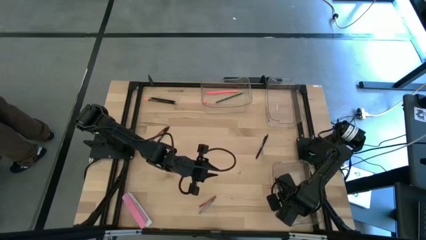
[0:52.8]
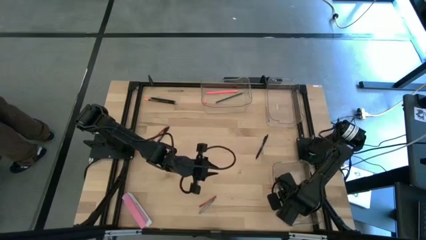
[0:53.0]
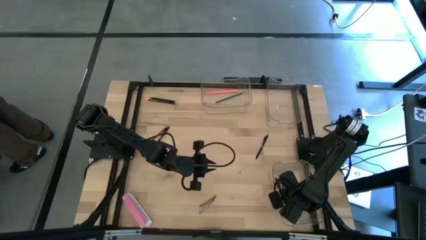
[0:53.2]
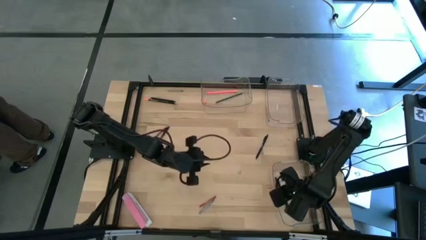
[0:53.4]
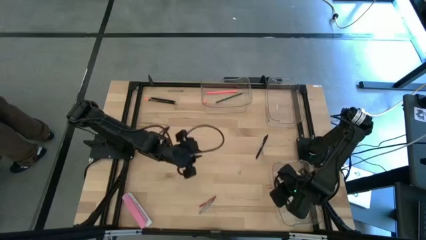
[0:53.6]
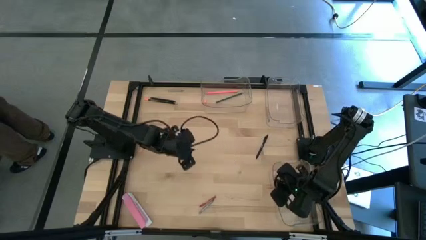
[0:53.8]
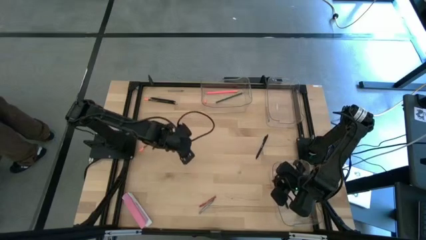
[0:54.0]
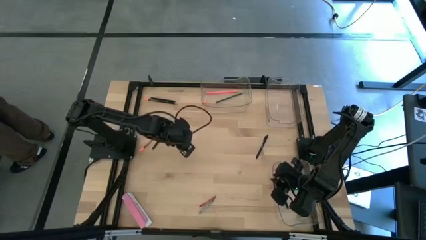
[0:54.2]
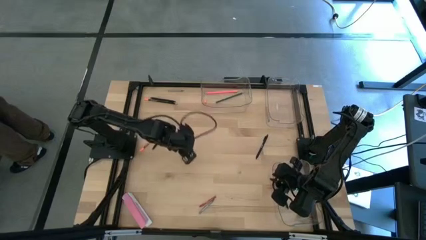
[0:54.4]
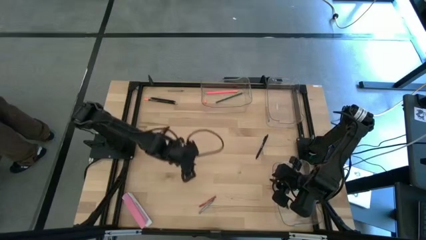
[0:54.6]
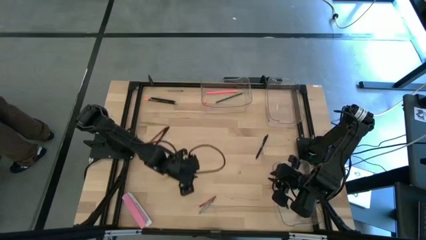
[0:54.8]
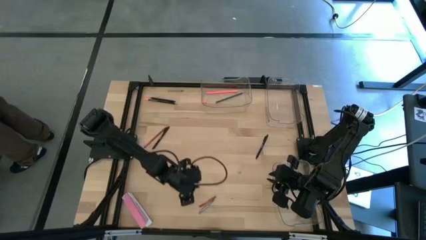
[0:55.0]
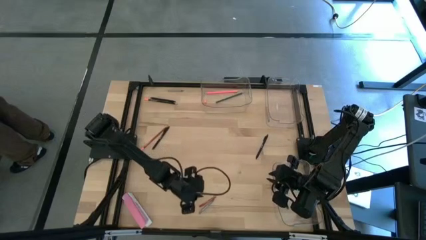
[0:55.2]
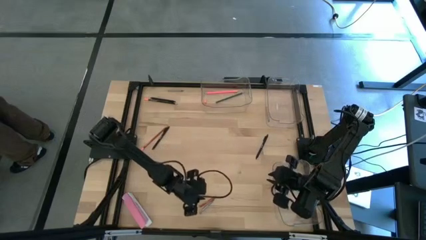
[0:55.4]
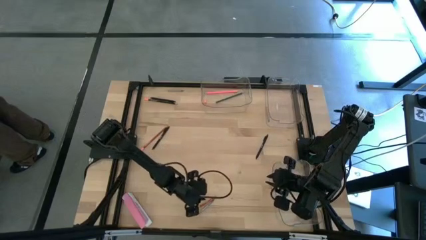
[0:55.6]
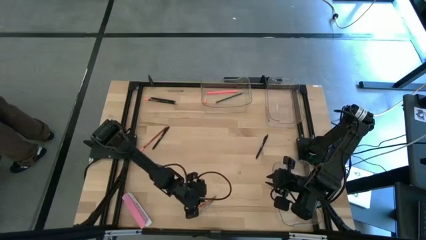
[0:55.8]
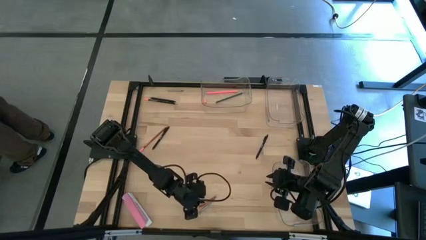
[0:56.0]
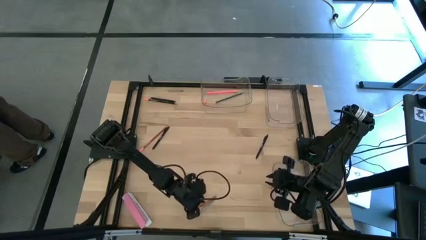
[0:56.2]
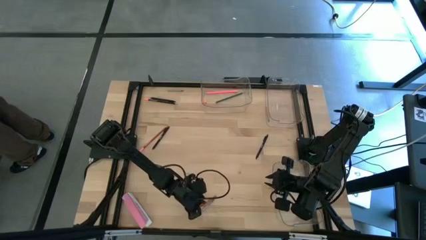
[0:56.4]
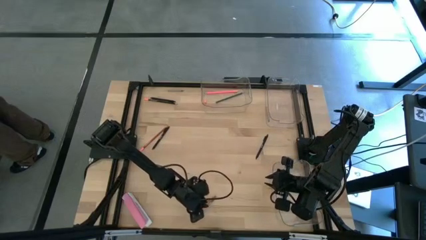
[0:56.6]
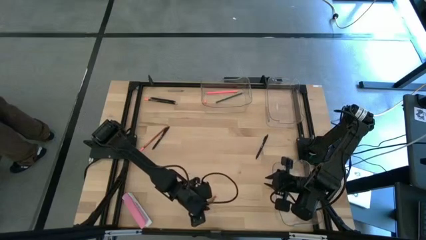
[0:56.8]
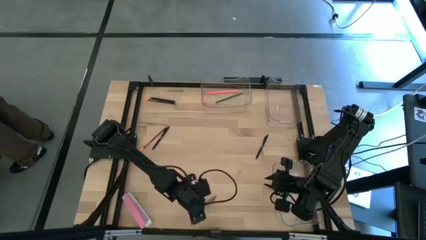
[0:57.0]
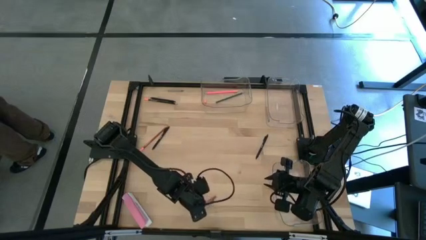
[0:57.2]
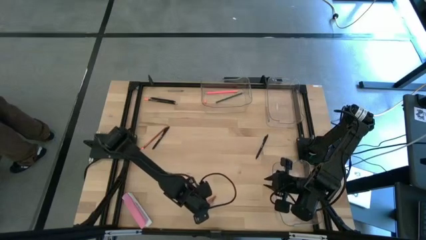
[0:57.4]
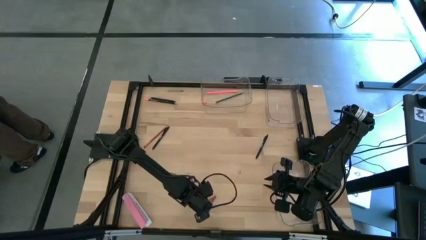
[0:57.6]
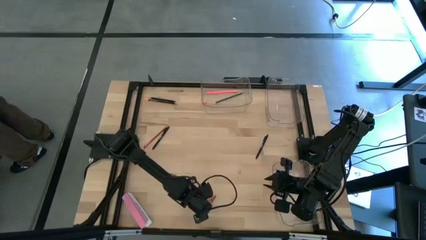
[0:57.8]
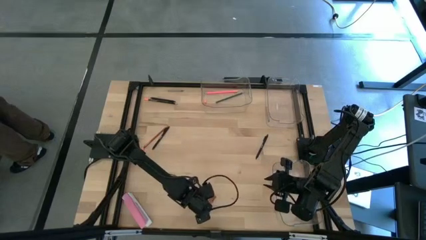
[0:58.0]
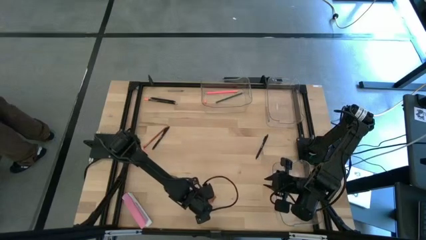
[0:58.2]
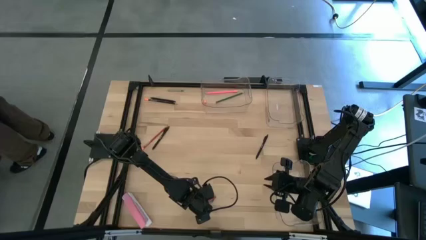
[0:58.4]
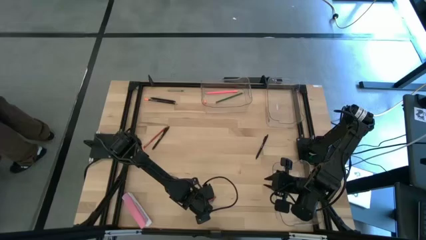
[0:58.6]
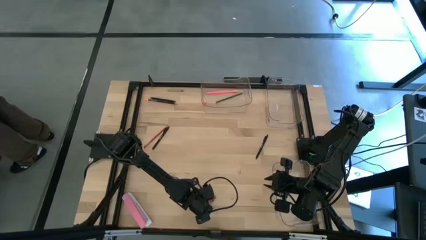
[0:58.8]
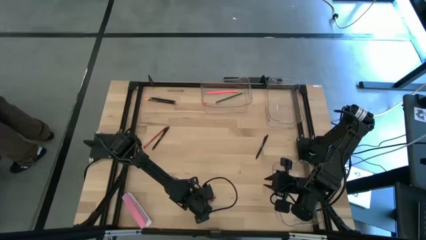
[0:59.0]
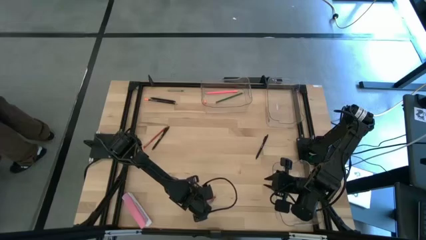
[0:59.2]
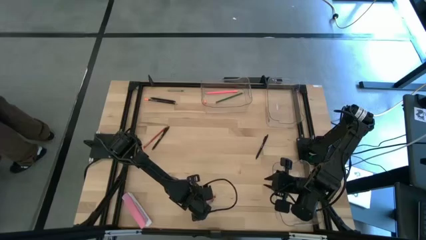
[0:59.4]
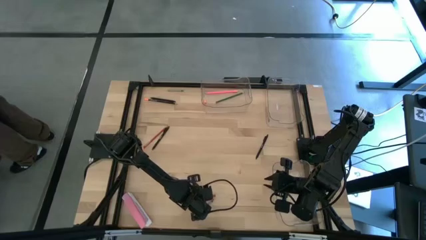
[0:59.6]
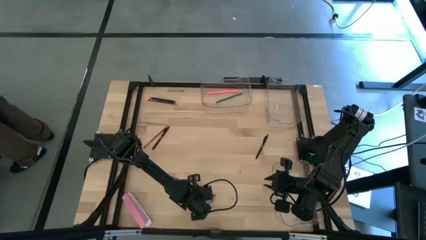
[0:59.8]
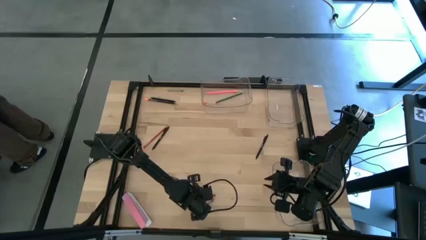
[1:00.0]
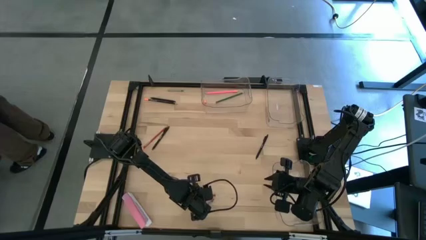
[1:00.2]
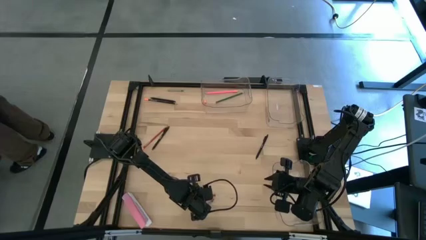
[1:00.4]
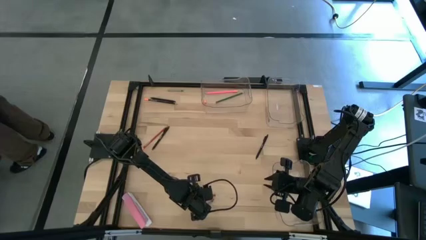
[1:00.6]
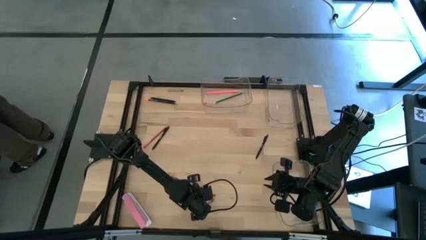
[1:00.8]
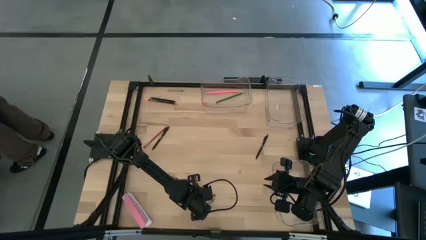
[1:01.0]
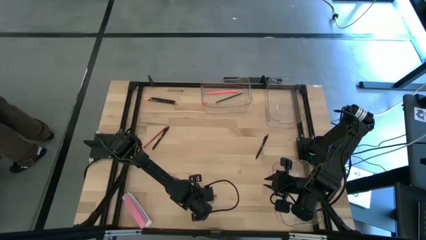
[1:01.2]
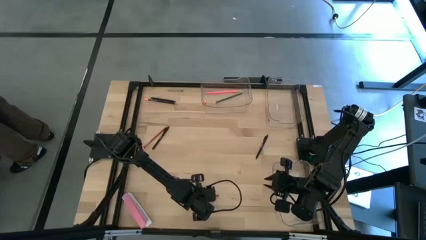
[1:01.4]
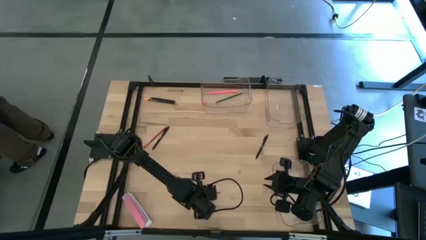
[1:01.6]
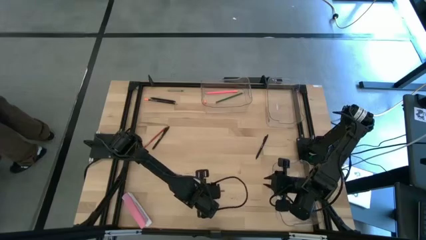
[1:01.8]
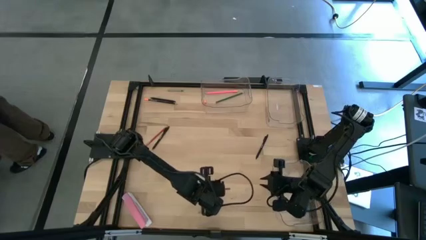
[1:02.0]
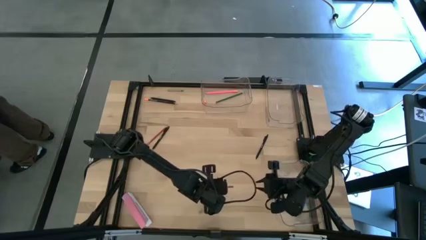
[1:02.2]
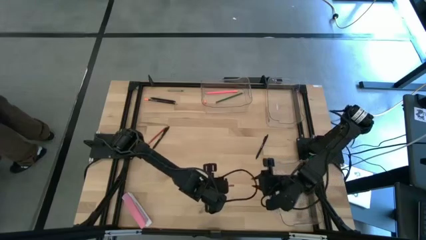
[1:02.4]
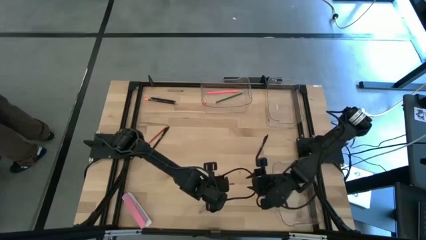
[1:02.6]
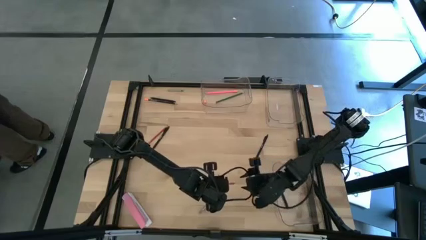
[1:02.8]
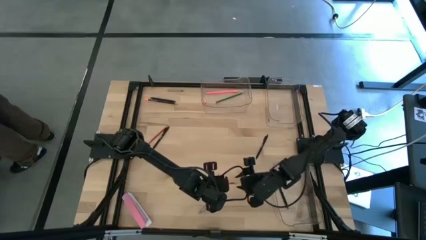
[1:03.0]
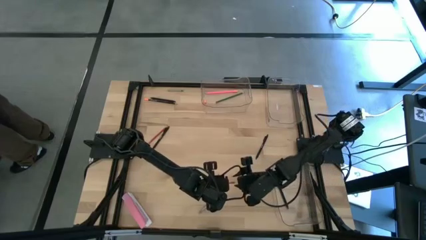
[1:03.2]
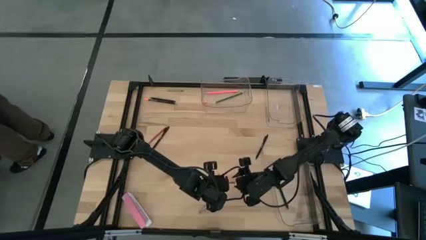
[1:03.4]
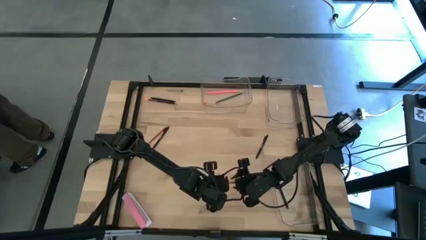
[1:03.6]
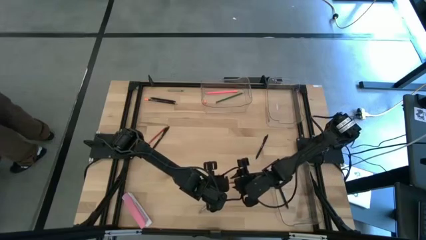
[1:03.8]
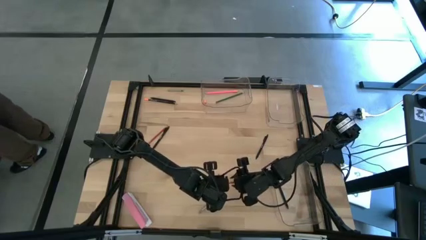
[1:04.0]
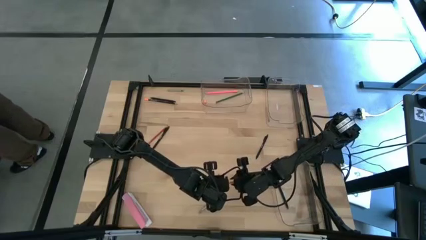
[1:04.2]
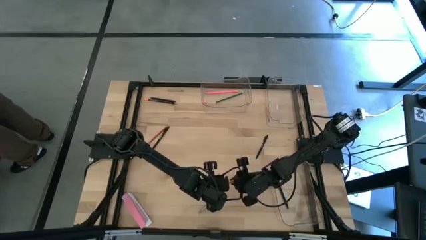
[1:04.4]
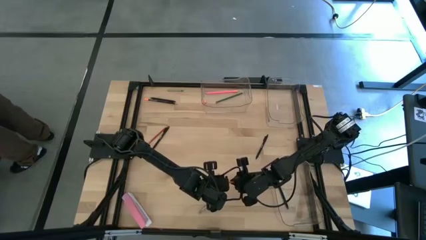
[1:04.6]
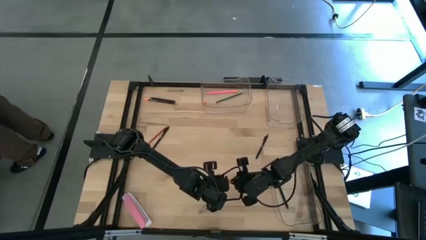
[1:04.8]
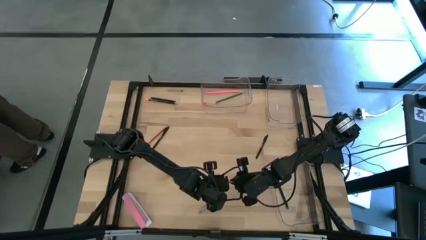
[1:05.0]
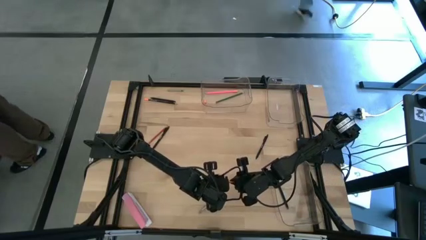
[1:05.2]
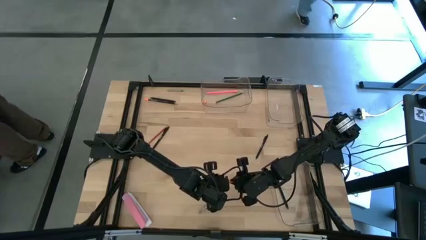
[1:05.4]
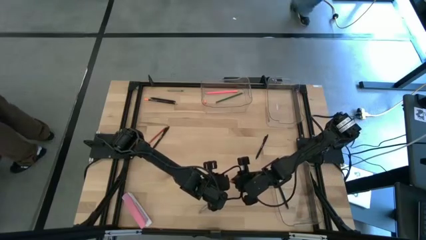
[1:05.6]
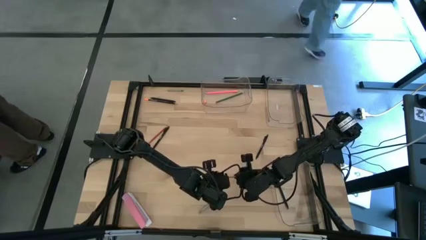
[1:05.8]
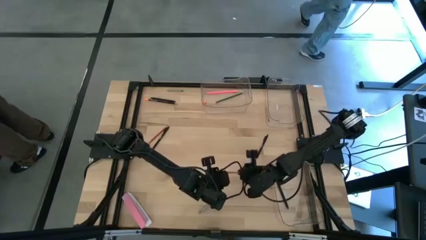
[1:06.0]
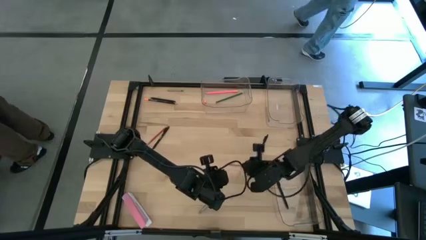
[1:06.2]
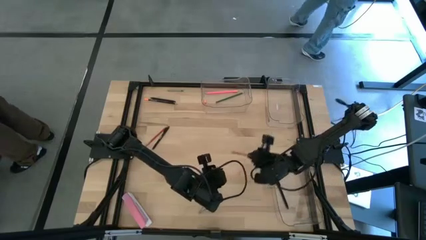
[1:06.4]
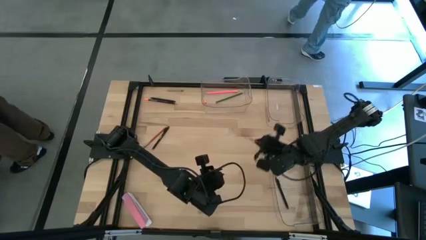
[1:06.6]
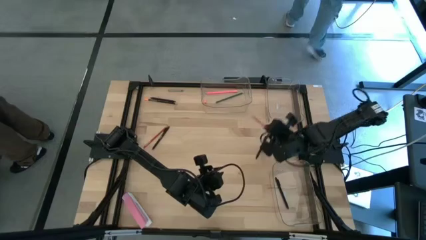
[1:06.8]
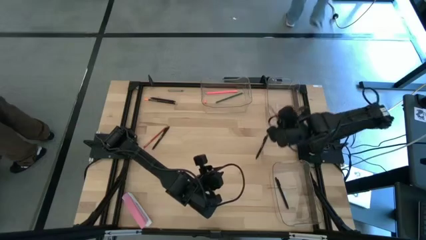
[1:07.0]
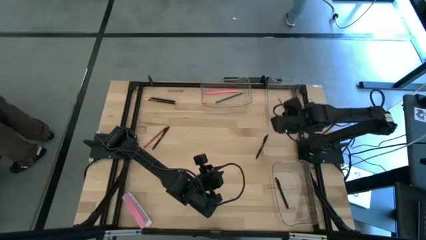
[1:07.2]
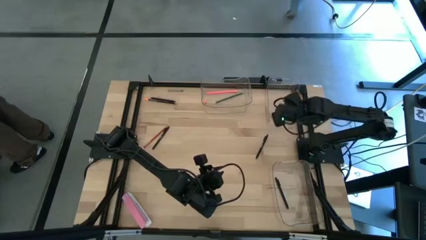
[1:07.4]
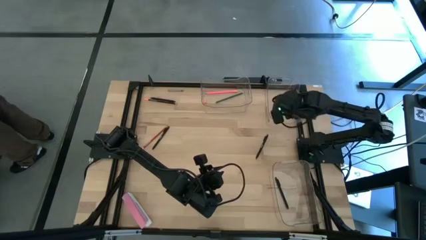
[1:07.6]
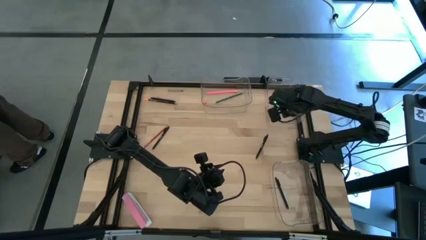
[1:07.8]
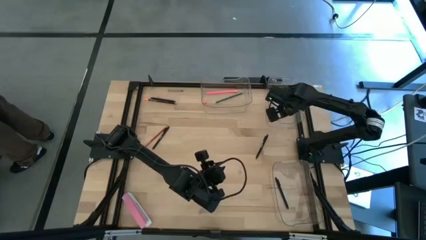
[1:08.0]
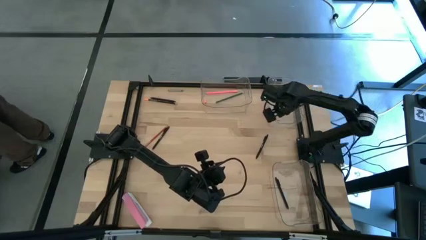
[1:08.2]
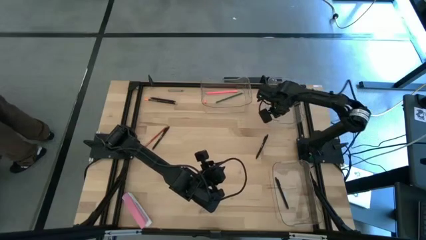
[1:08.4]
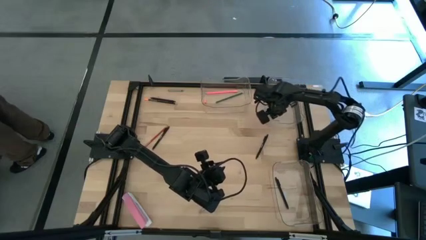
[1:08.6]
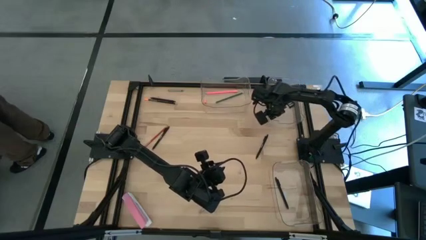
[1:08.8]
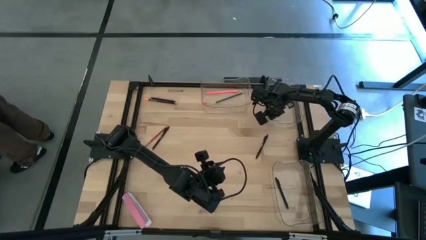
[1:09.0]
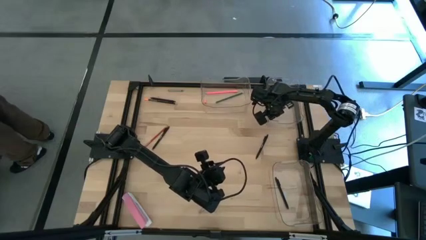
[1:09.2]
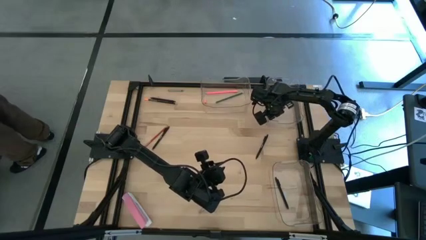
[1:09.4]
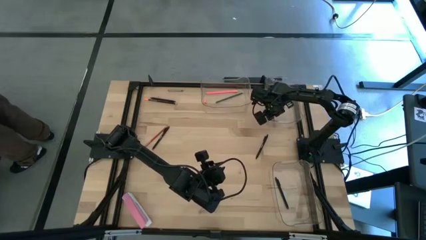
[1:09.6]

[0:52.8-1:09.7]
Task: Sort crayons/erasers/pens/pencils in bins
Put the red crayon into the top right transparent bin
